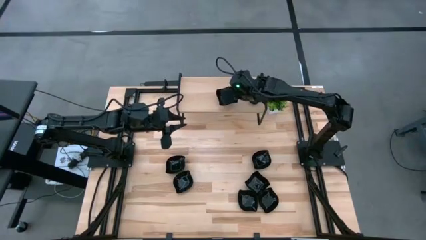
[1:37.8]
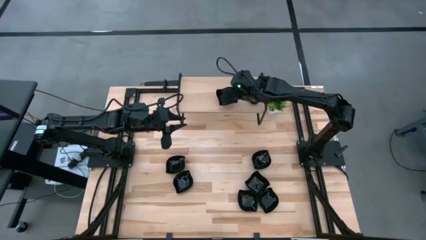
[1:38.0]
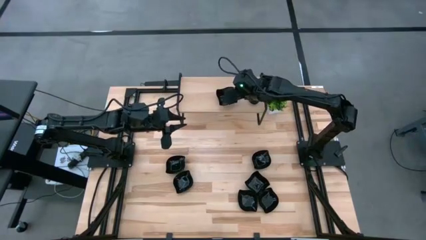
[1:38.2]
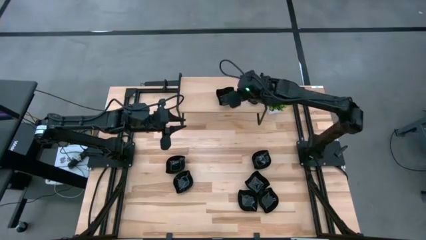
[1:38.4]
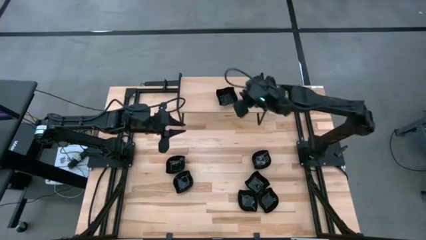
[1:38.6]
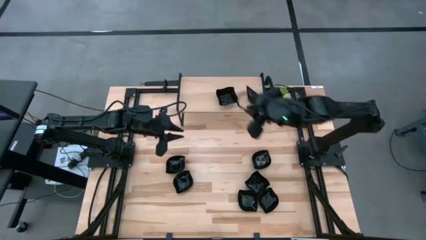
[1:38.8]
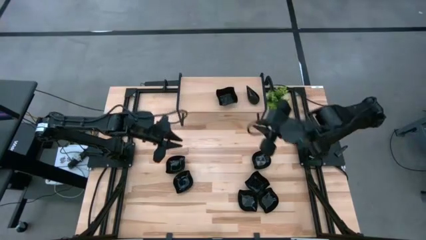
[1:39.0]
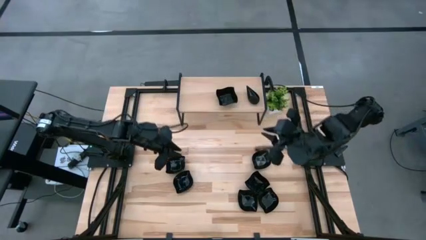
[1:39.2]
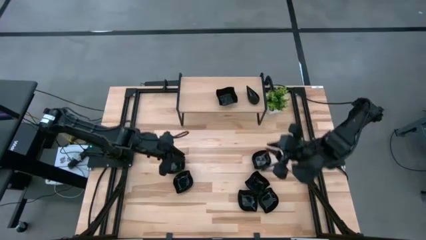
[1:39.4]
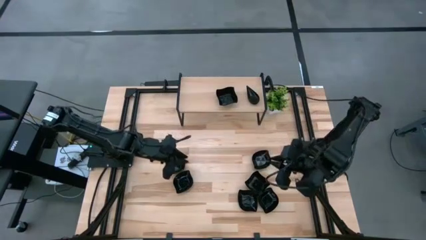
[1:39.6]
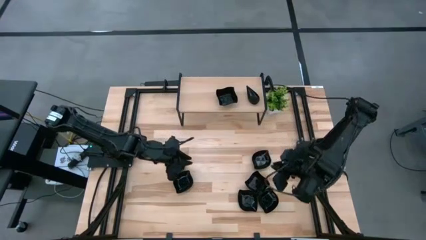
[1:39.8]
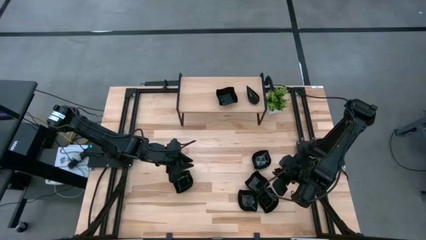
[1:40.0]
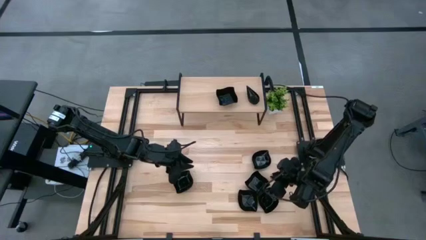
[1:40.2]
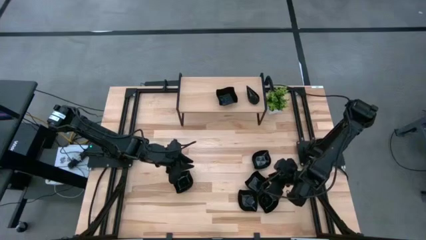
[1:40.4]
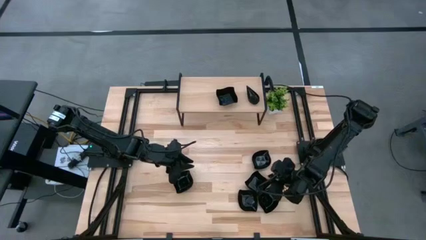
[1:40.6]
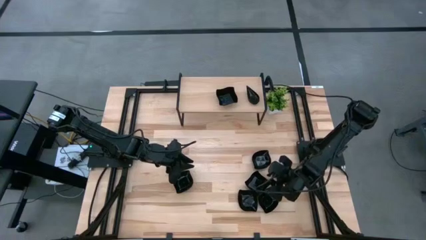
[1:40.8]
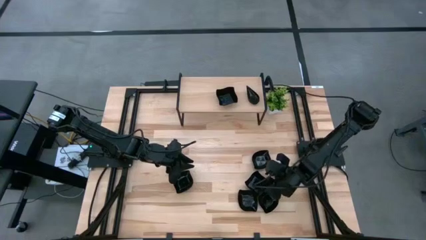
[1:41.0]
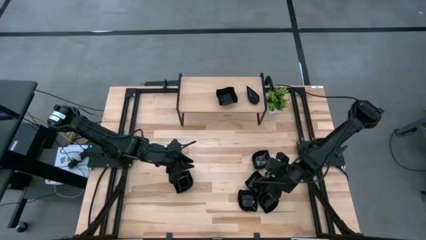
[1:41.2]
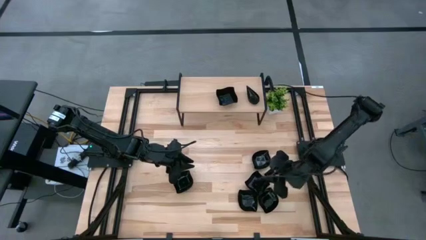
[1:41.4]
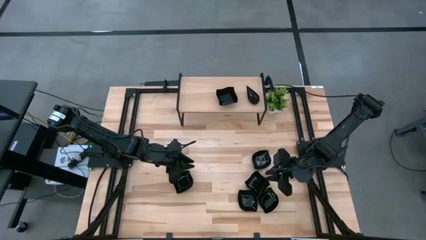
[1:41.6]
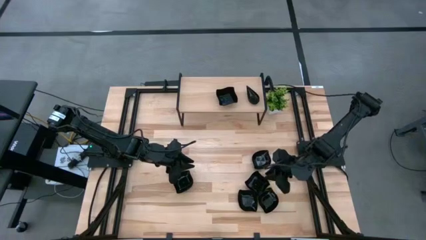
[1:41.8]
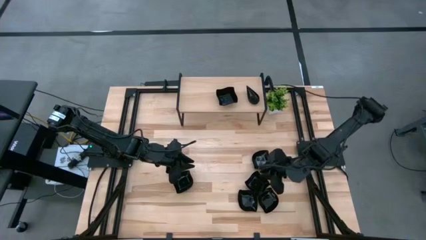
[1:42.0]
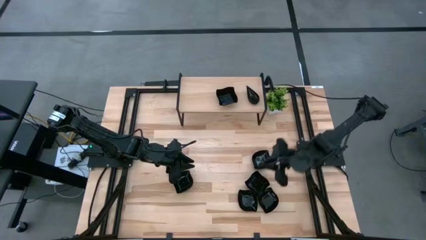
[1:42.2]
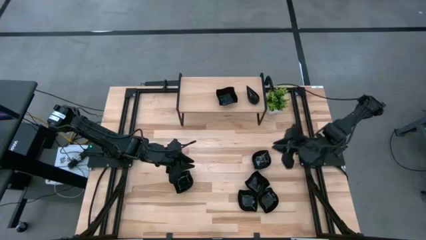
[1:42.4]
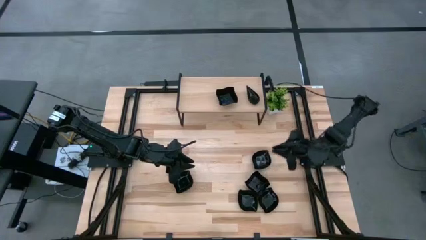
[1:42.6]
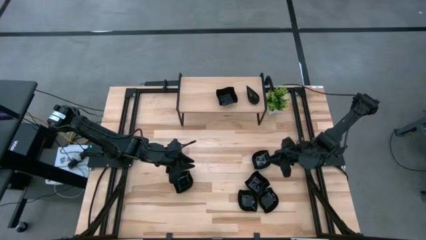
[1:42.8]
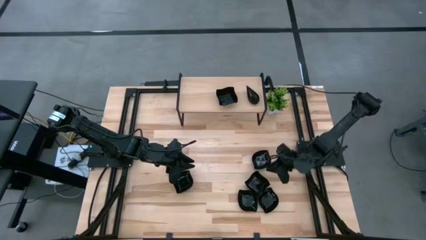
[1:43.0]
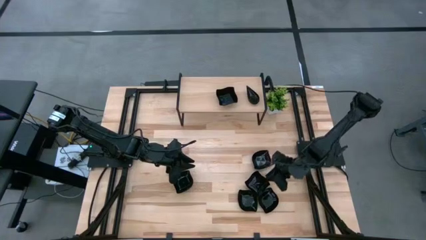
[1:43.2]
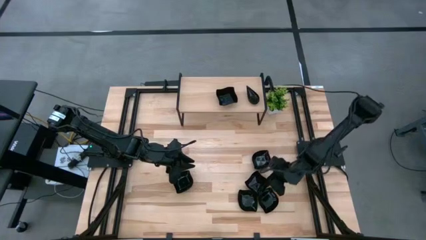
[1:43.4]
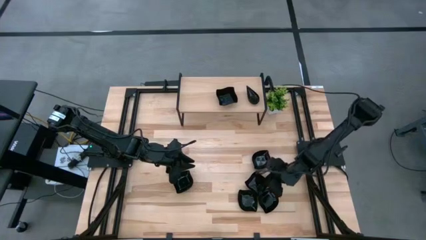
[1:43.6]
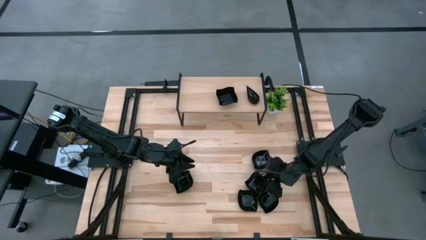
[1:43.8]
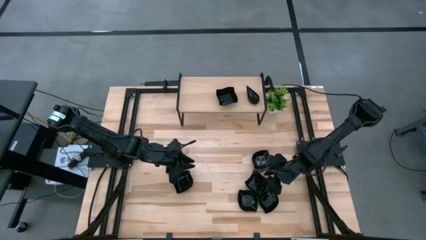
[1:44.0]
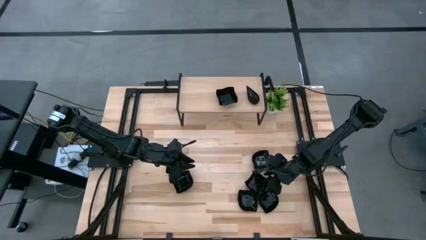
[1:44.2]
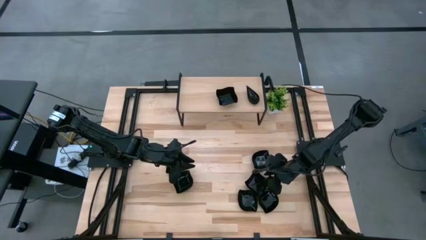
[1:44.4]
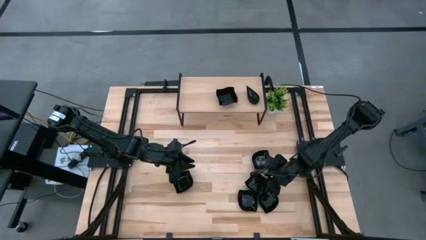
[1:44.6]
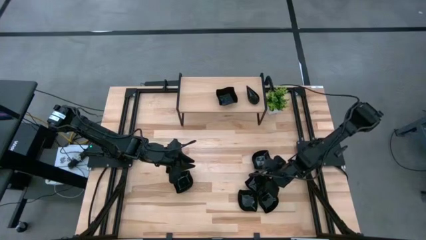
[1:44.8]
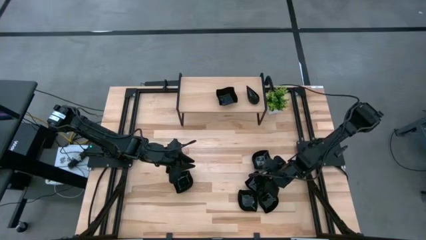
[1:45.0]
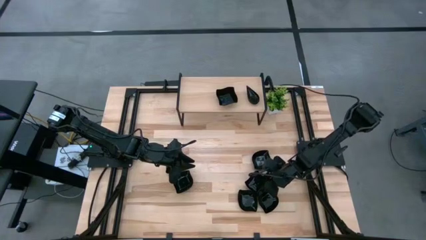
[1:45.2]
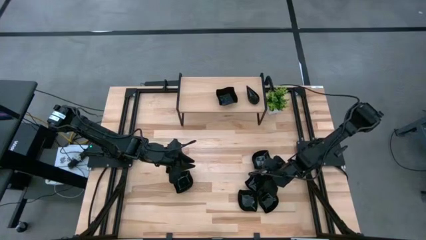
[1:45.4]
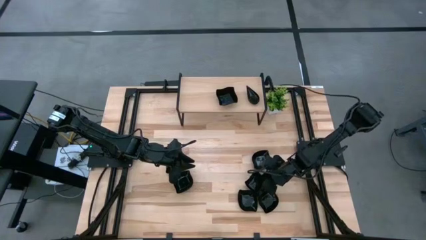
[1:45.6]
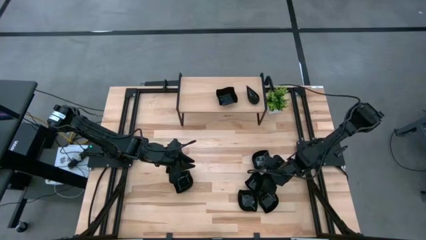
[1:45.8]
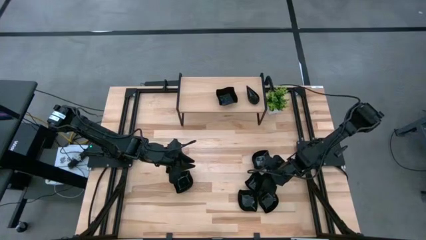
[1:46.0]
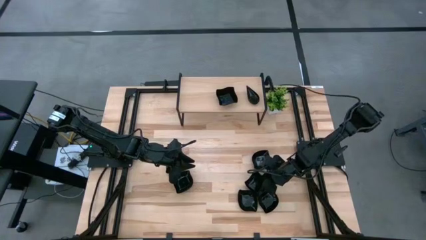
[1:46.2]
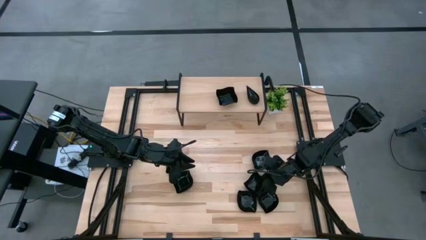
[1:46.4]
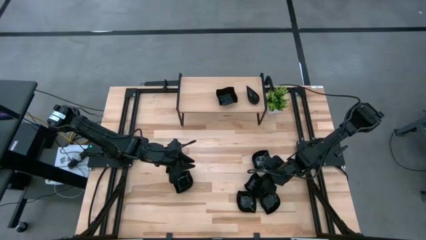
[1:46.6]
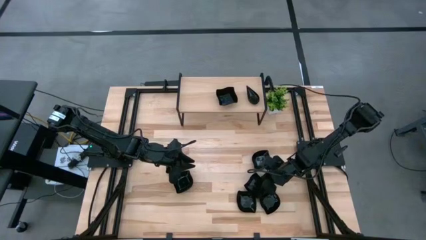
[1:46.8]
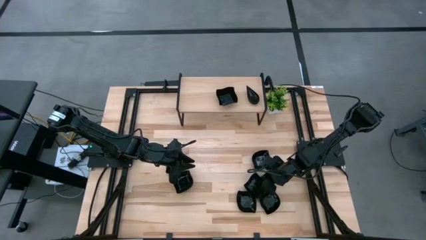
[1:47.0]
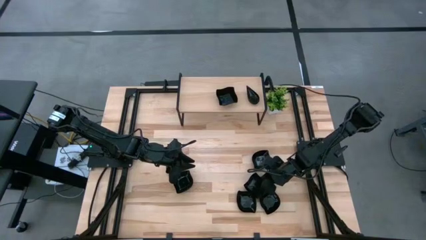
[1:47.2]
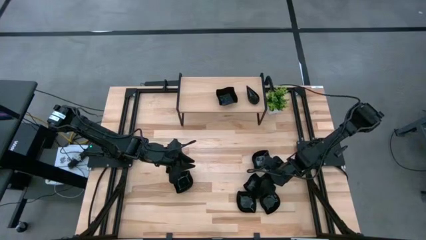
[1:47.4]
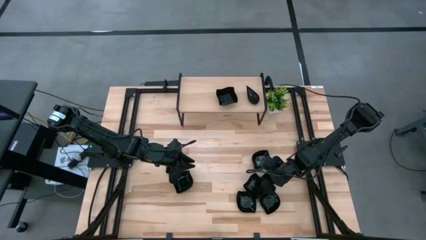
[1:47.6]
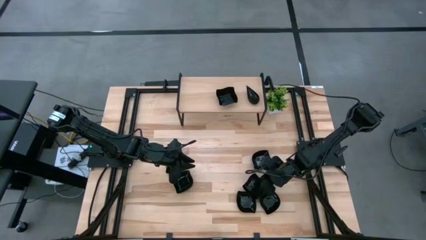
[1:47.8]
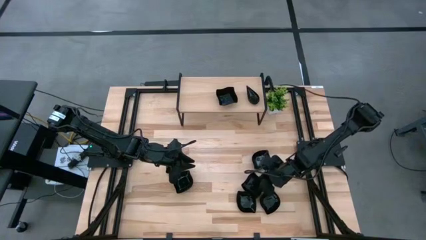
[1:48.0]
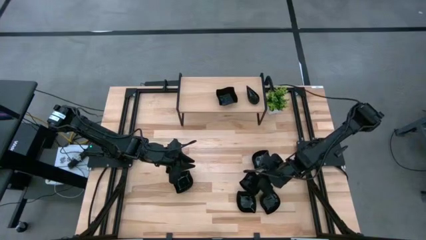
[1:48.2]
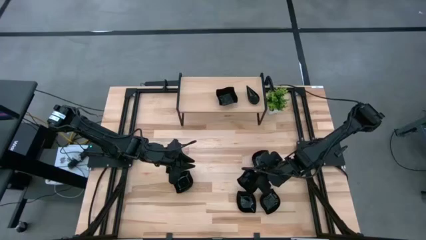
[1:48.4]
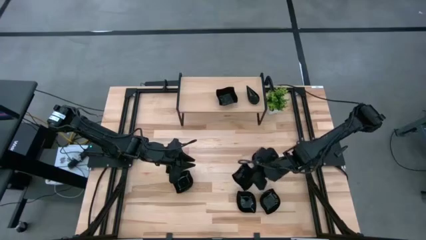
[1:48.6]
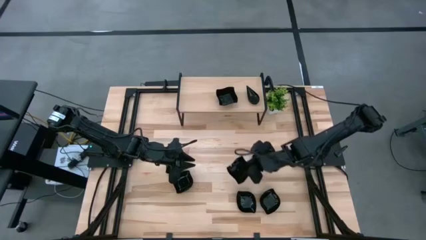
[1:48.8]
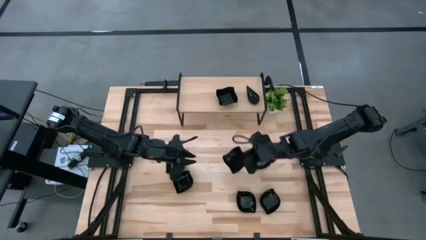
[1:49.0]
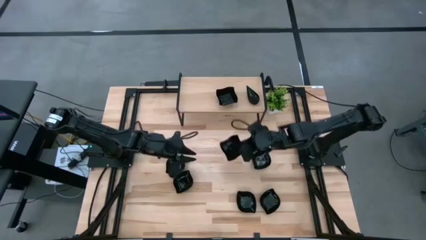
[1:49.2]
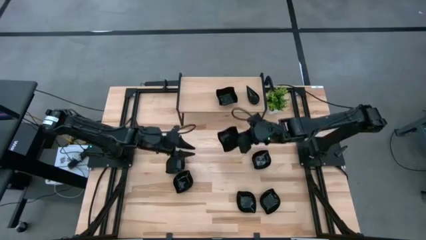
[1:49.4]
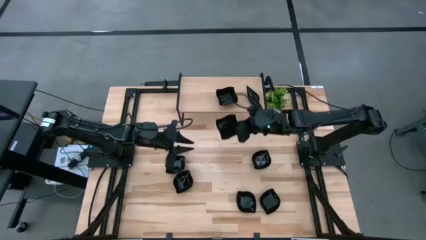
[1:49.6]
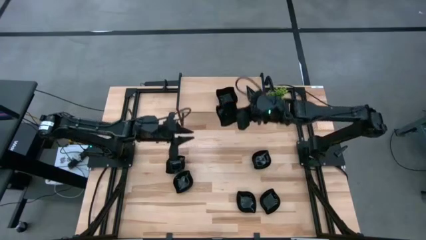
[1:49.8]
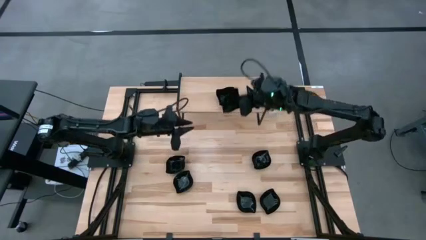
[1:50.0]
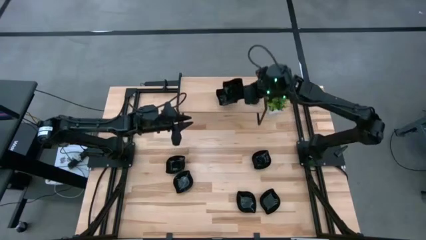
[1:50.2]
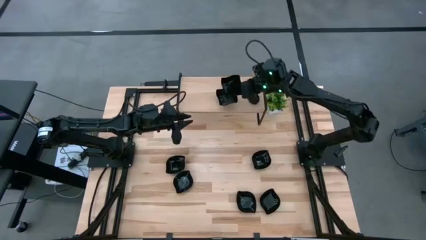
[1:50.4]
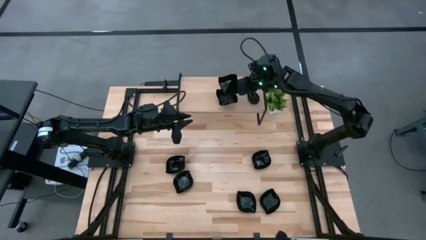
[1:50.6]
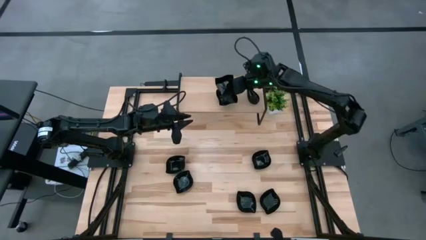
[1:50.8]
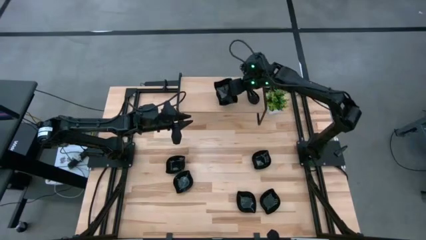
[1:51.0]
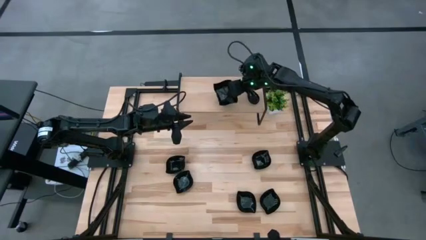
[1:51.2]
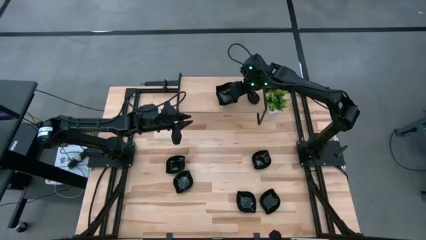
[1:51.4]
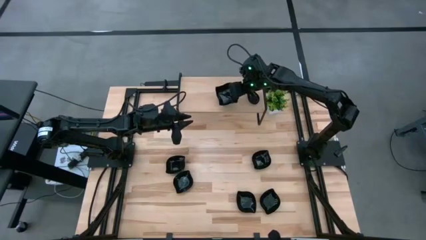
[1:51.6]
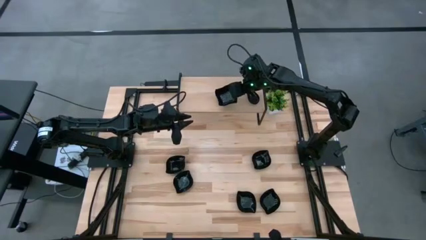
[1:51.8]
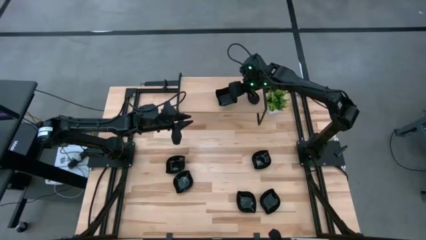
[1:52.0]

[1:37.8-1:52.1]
Task: Pick & Place Mini shaped plates
Stack the black distorted square plate on top of the black distorted square plate on the shelf
